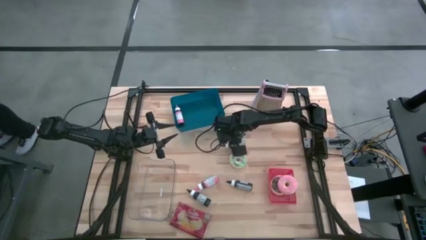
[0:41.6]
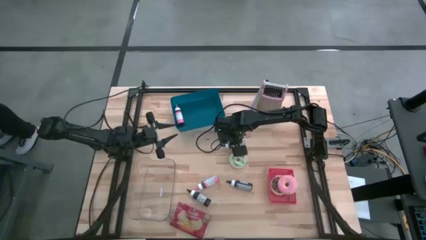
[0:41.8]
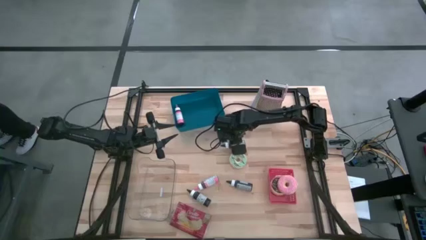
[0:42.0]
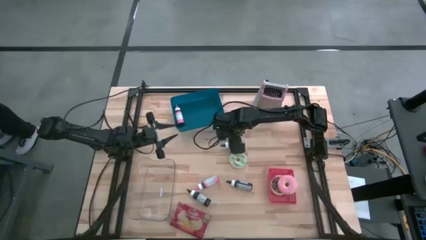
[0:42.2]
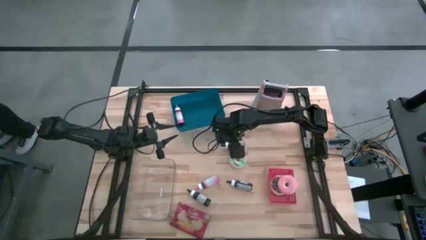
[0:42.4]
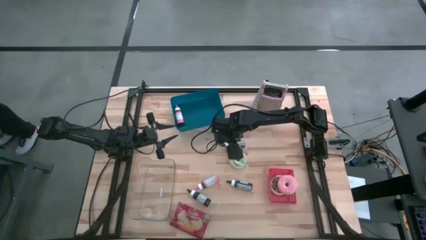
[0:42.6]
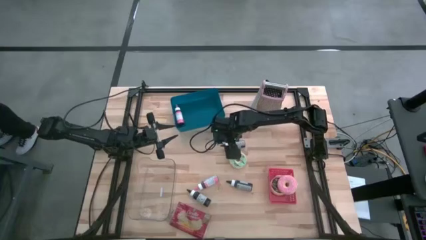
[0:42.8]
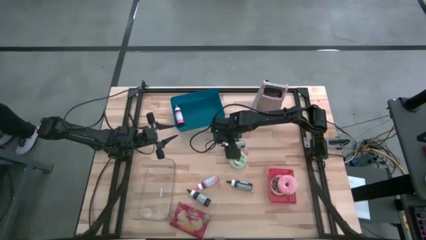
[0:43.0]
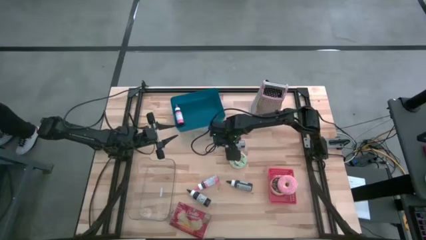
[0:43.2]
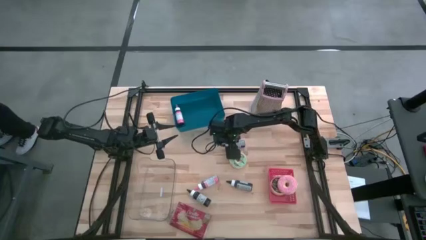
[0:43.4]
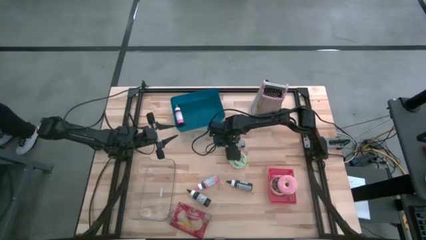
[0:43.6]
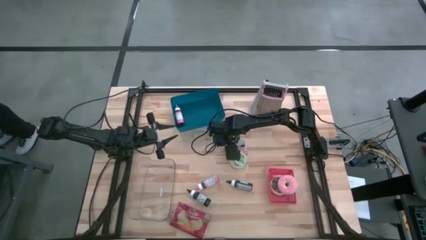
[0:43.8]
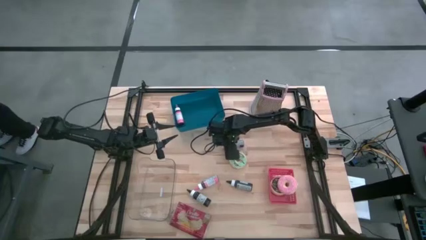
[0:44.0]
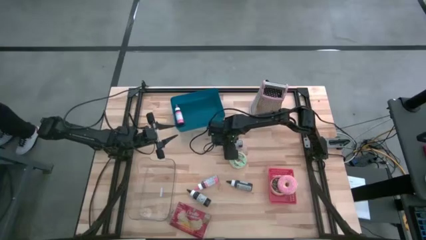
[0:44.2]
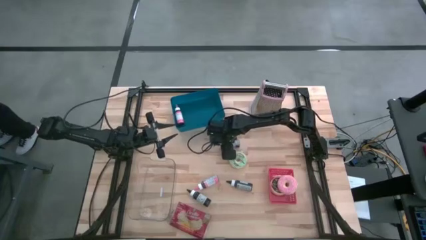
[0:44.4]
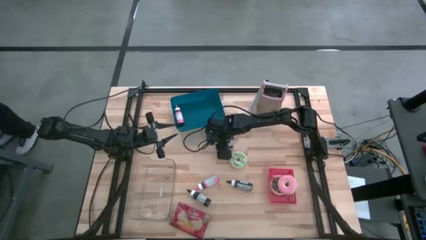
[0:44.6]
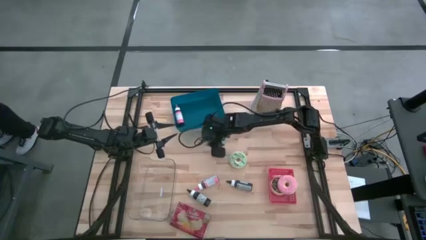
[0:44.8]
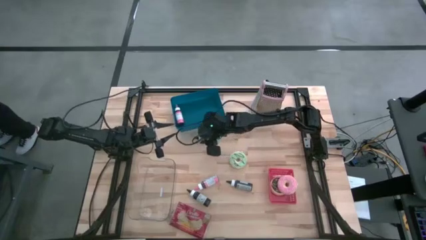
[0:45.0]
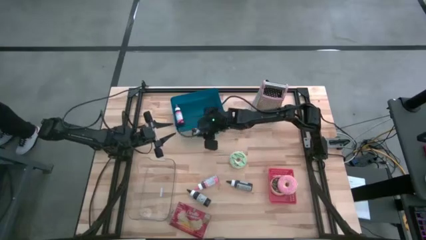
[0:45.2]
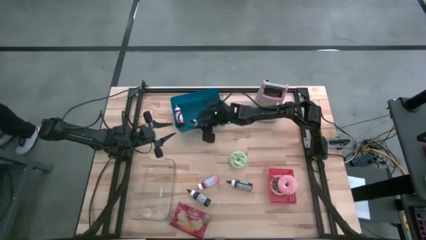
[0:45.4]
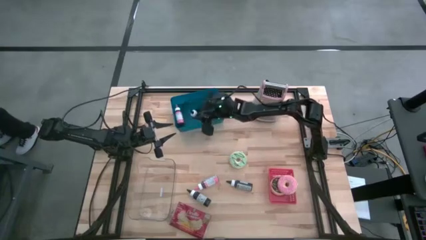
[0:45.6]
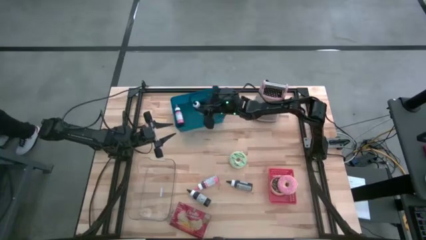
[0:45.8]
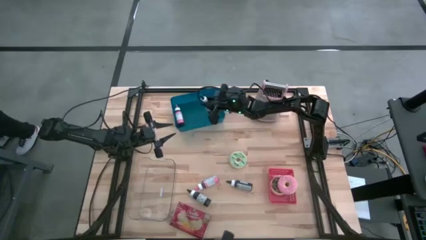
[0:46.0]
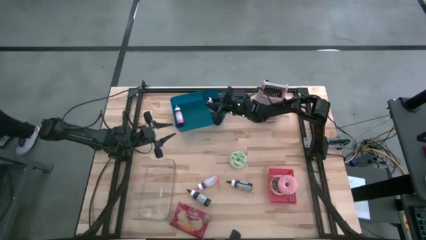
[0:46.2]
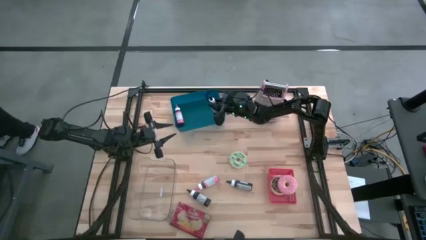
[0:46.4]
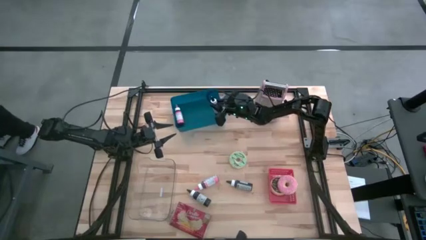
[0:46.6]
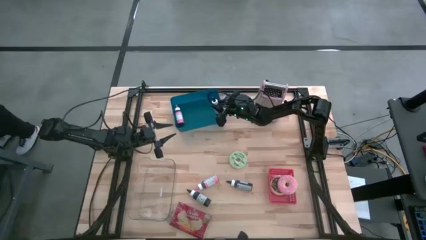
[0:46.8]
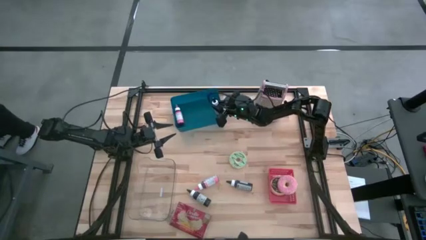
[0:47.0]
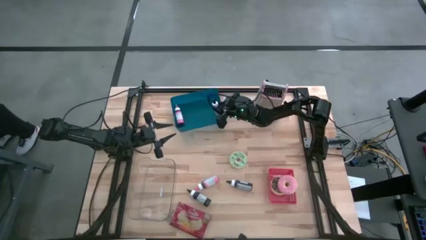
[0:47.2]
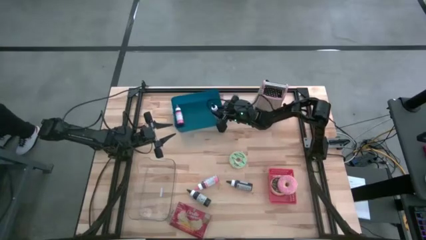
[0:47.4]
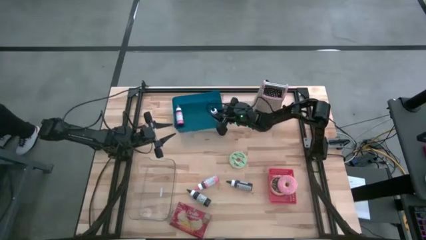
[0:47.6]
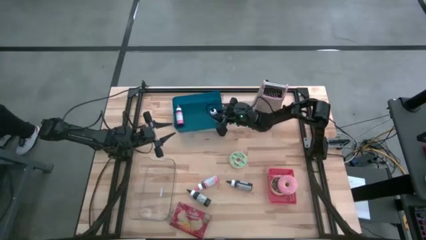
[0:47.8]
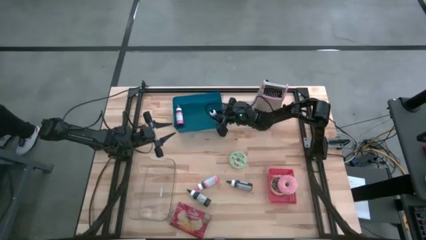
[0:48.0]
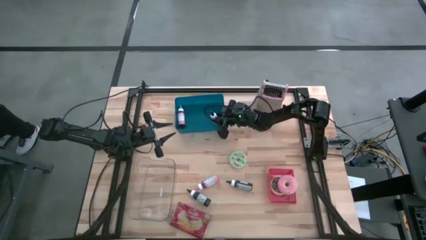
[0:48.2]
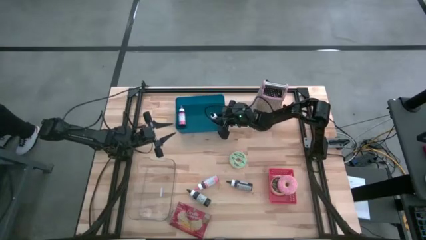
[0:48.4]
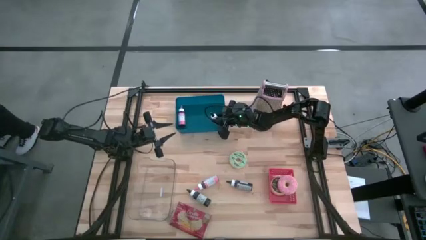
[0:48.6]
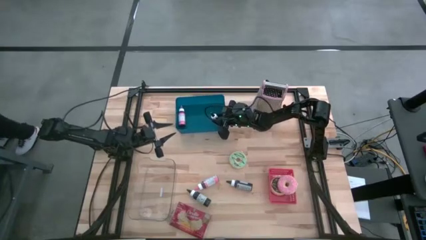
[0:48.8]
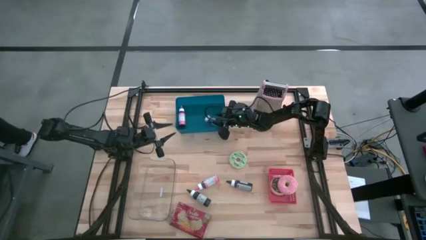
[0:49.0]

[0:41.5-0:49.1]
Task: Pick & Place Food Item
Put the top black food coloring bottle into the blue bin

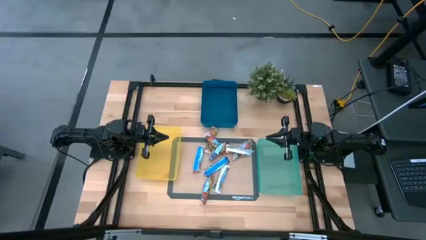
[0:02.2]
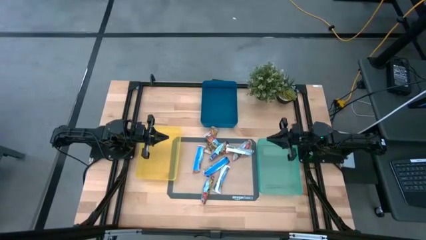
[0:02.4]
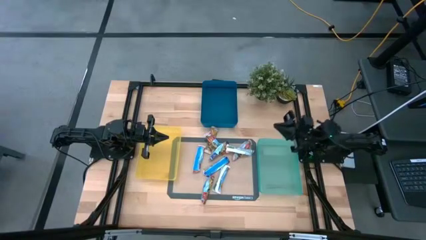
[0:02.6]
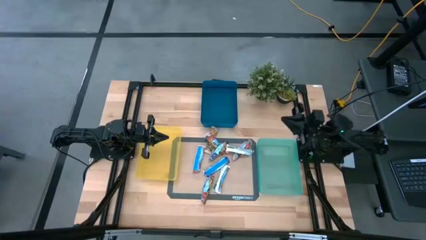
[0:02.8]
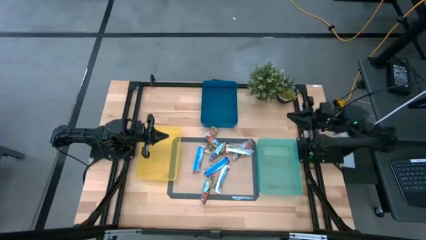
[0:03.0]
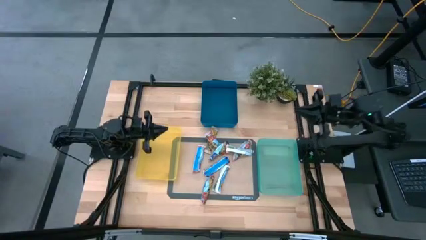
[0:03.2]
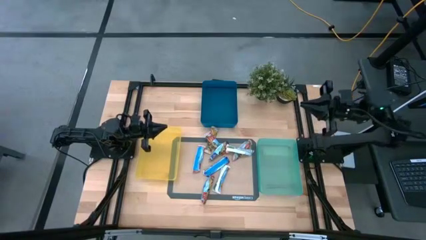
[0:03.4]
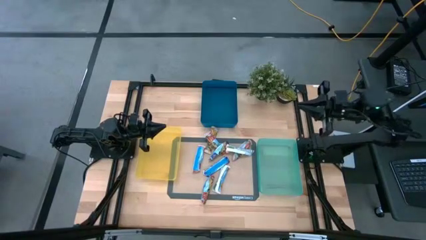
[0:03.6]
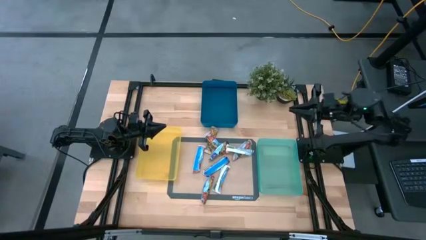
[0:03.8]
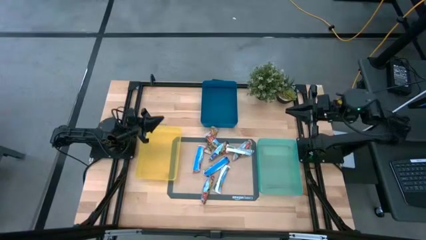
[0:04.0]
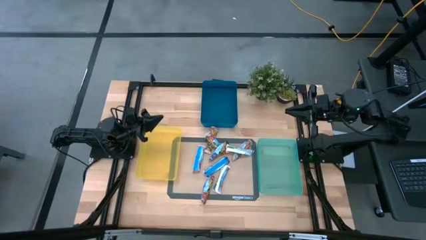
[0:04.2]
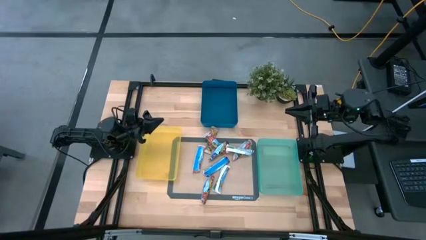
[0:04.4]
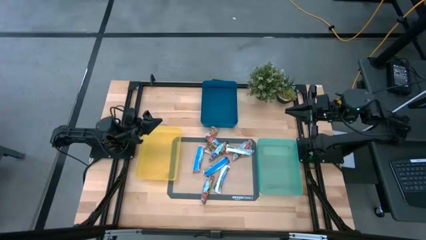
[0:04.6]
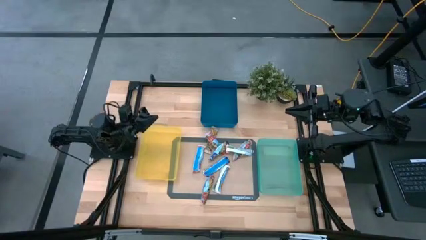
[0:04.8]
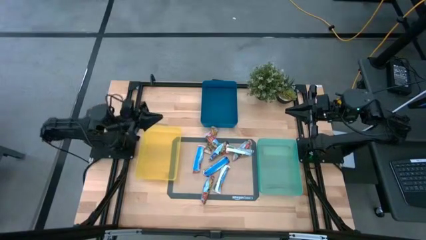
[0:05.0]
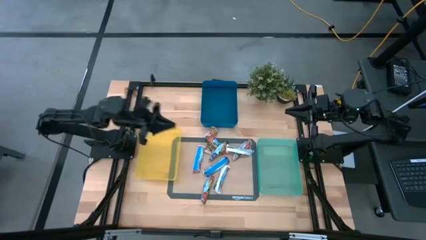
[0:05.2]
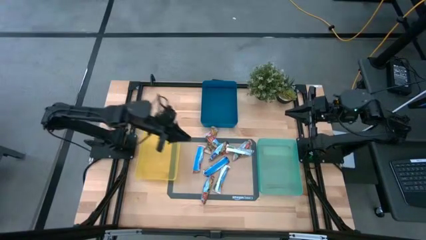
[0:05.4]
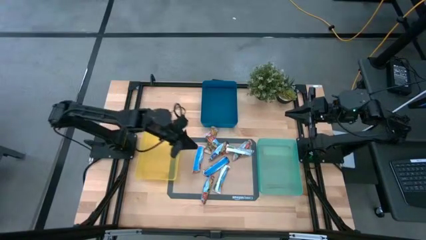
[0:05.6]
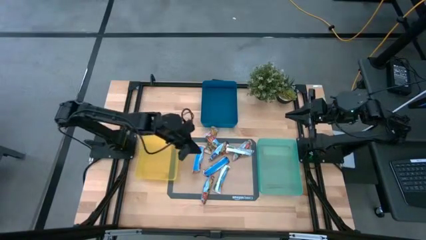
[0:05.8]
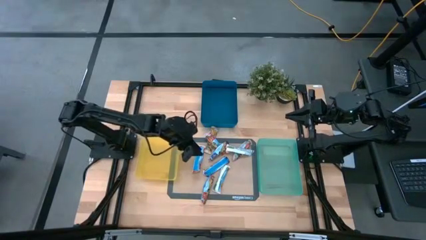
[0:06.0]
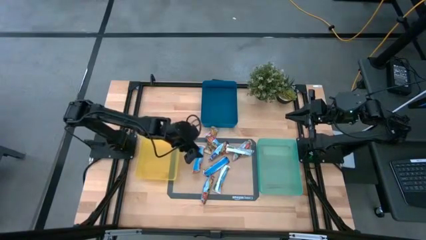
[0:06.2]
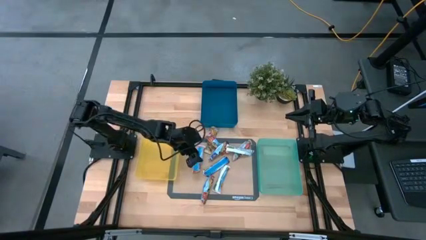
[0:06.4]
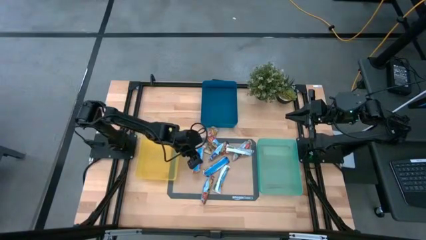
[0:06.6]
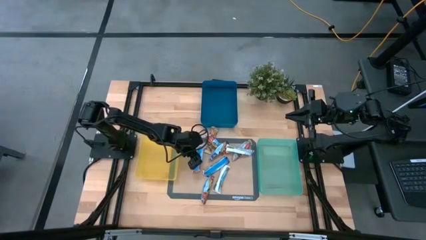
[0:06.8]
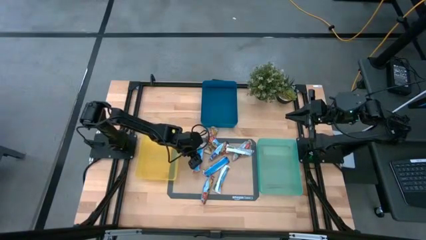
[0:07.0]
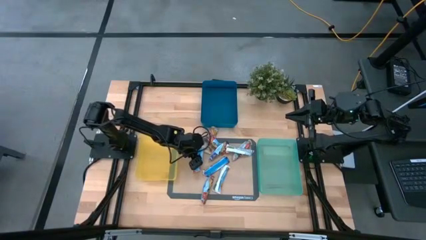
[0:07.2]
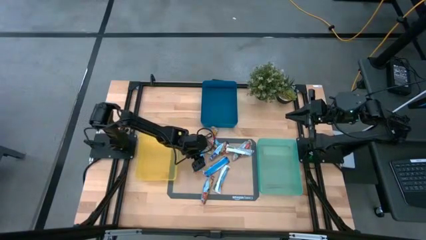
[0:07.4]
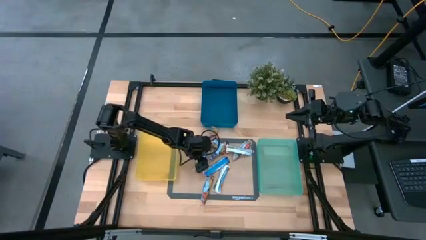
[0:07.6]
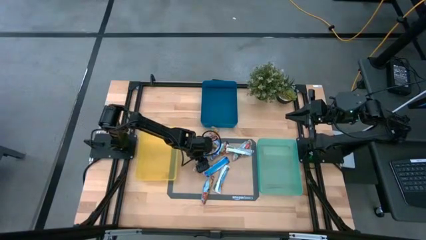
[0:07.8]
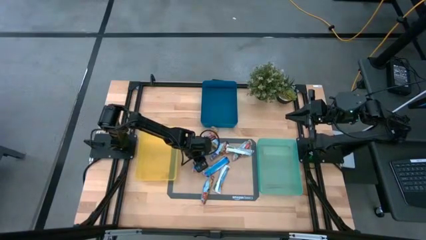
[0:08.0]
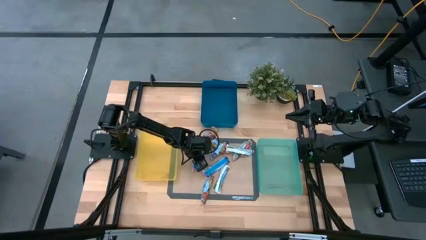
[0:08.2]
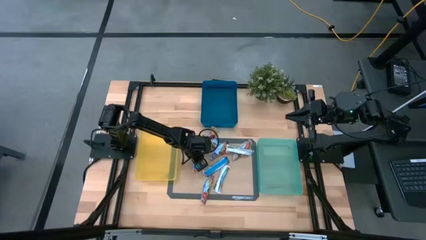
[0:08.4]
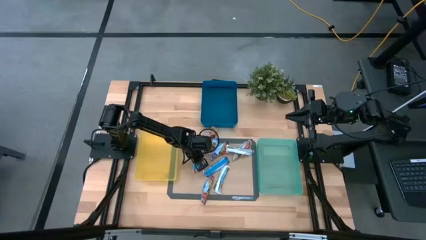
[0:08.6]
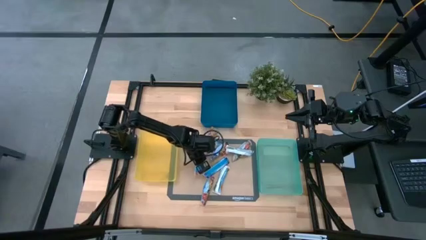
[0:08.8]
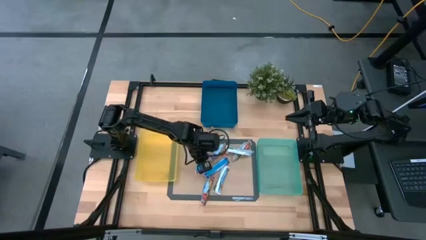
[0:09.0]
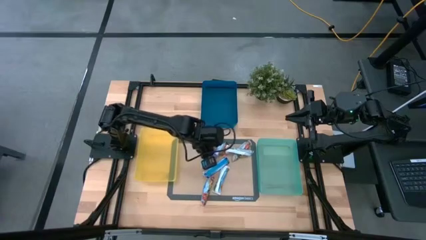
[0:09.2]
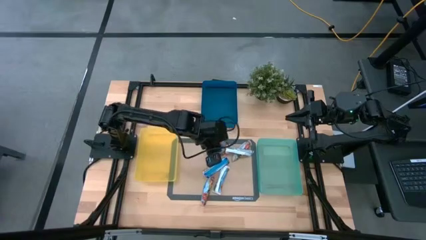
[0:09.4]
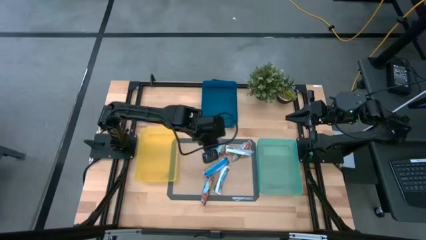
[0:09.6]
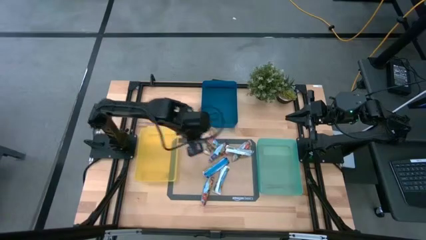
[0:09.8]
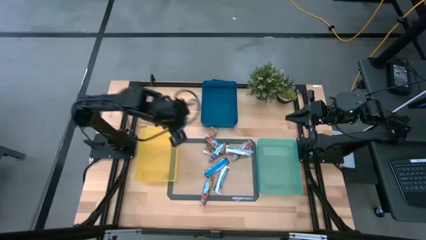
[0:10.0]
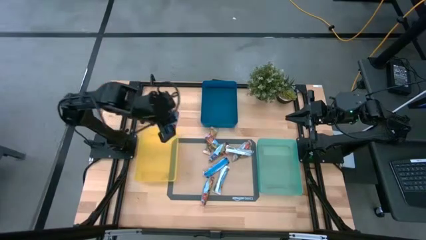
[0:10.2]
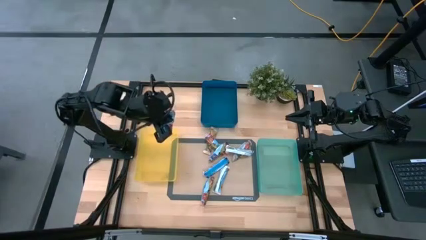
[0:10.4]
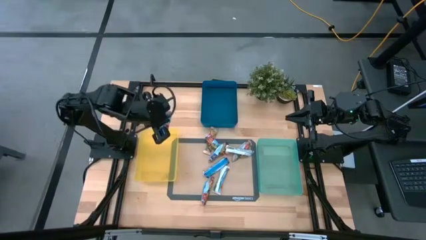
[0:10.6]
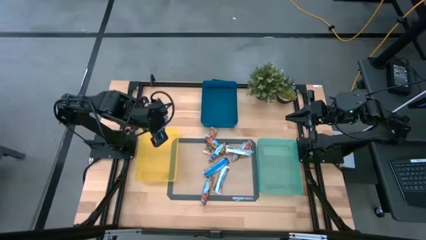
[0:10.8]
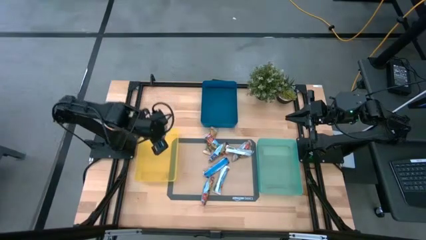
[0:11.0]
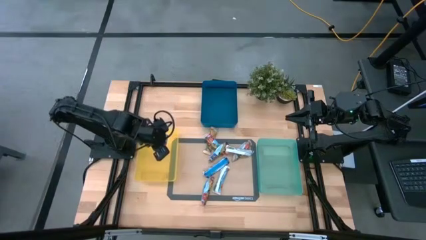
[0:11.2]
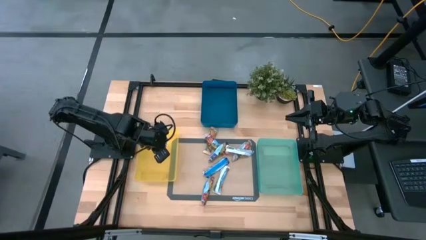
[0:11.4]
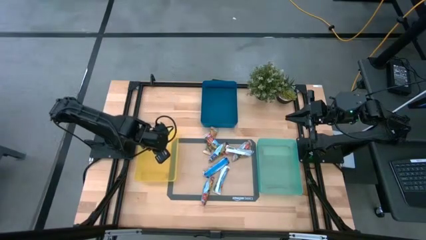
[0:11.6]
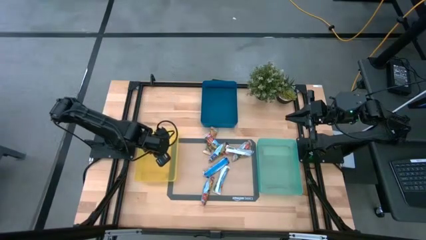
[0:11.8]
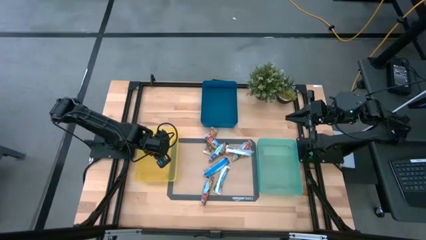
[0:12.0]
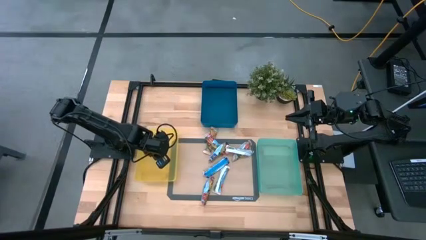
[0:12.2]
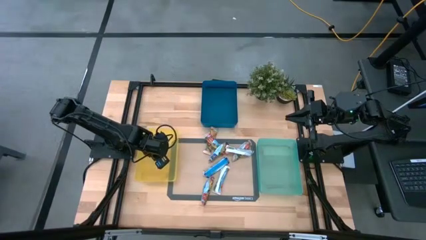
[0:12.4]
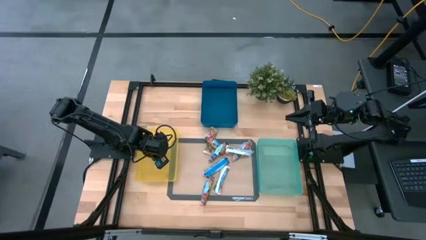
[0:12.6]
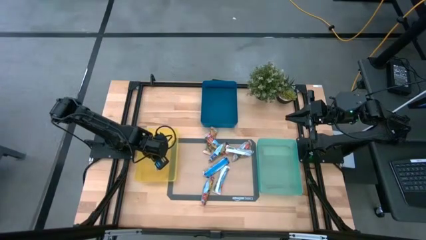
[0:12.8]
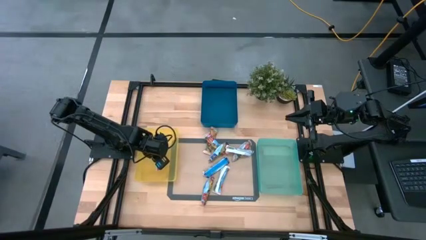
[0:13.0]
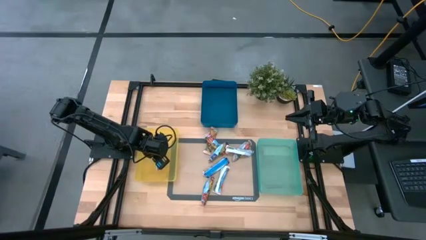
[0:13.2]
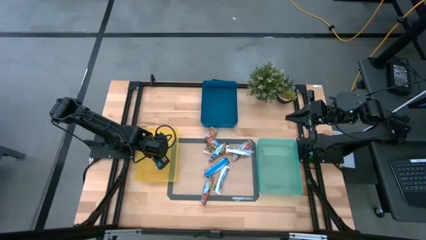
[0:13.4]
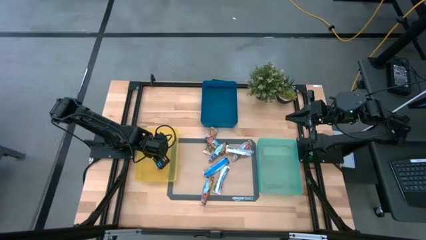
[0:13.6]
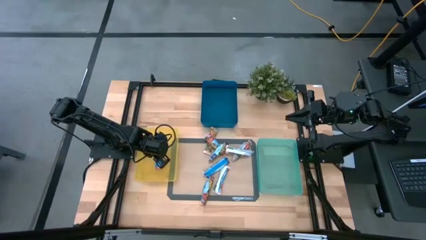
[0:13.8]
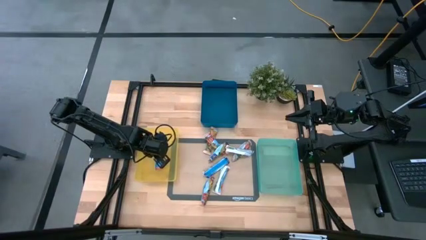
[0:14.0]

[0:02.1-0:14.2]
Task: Pick and place Granola Bars by type
Put the red granola bar into the yellow bin
